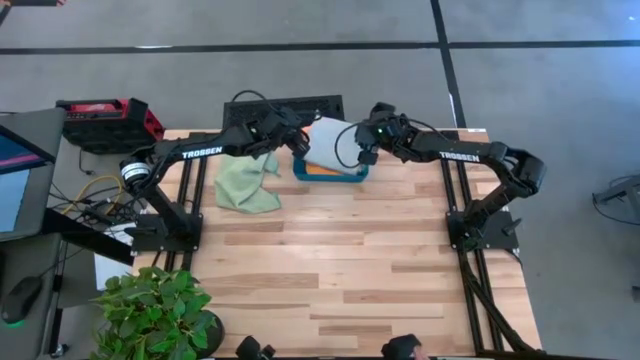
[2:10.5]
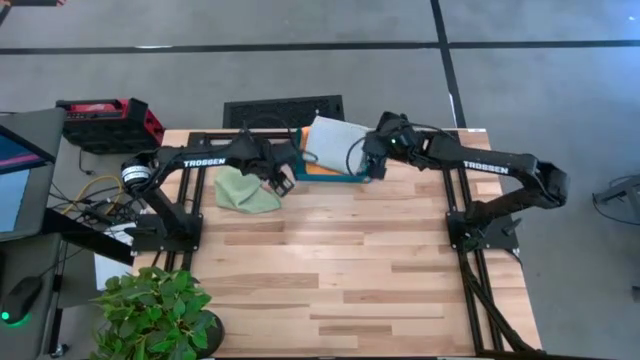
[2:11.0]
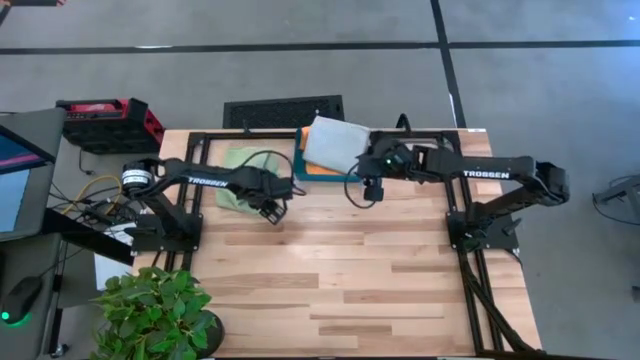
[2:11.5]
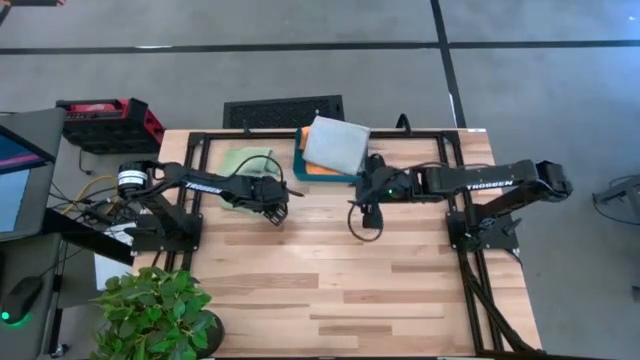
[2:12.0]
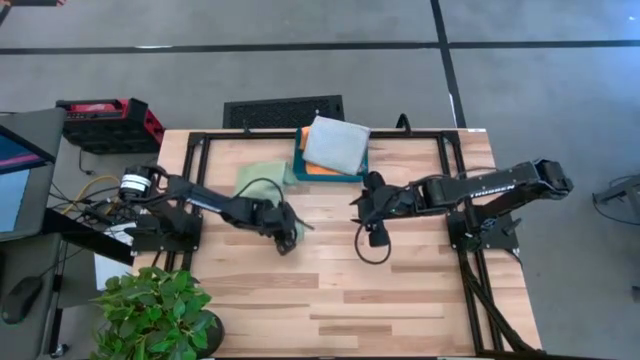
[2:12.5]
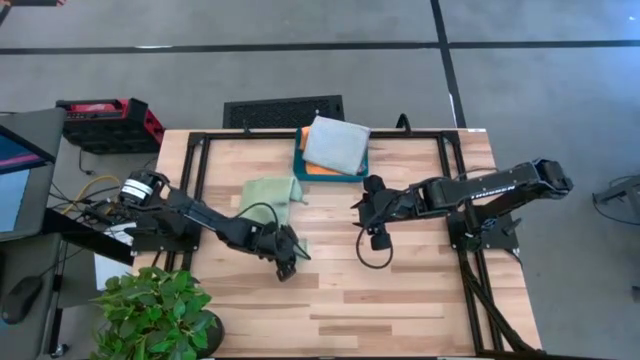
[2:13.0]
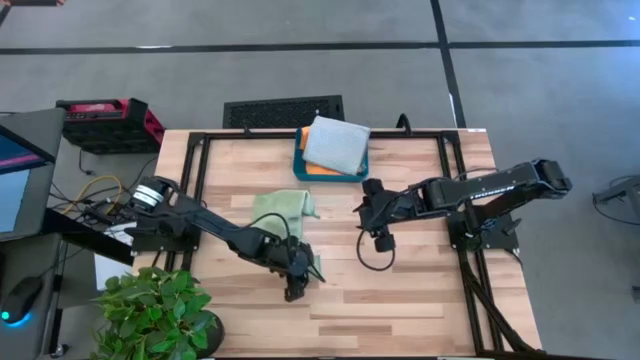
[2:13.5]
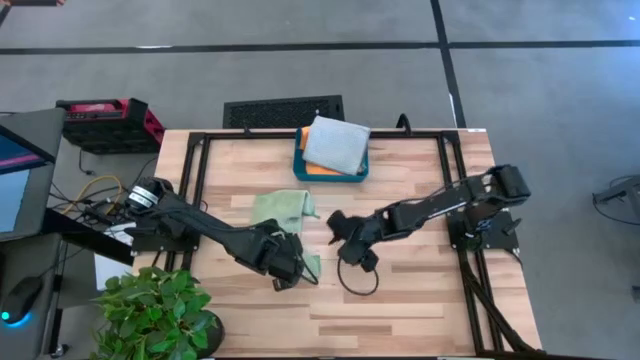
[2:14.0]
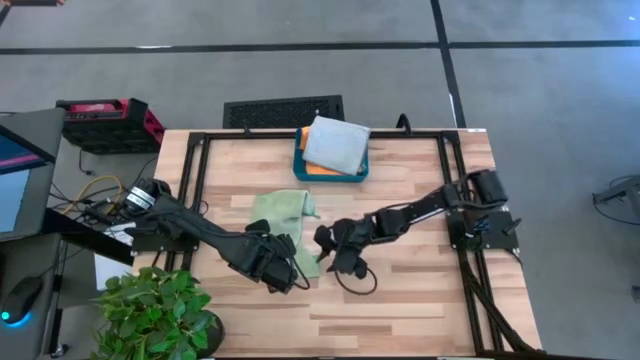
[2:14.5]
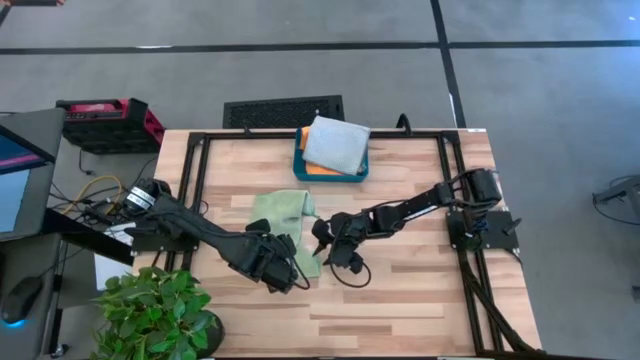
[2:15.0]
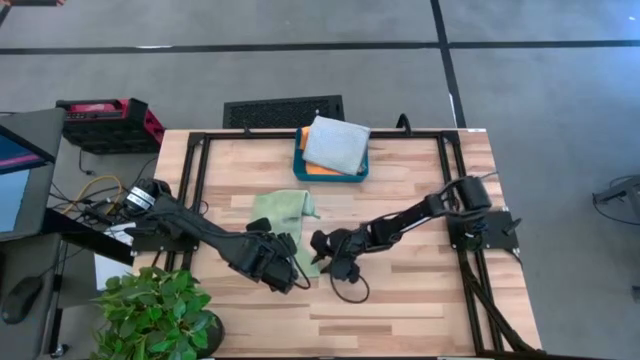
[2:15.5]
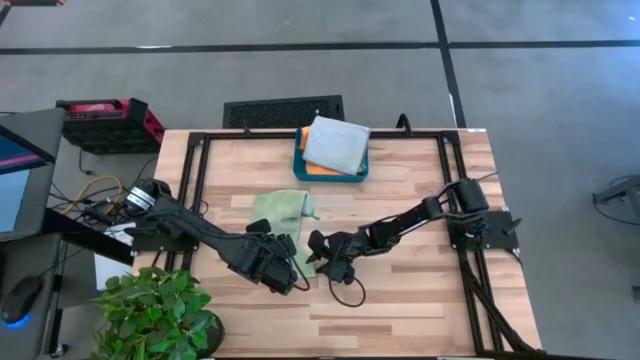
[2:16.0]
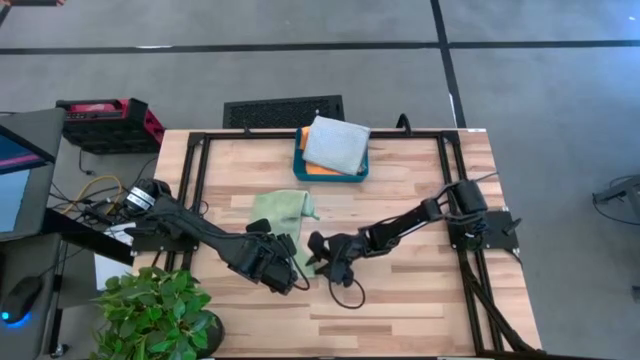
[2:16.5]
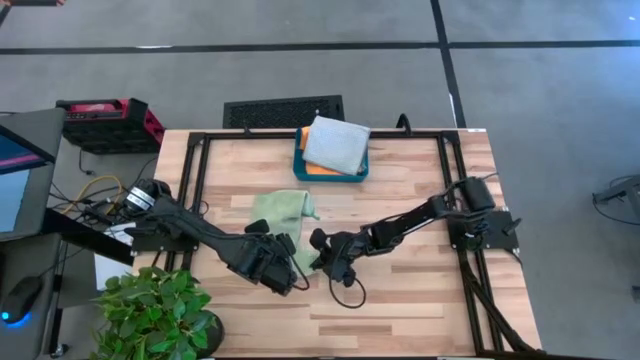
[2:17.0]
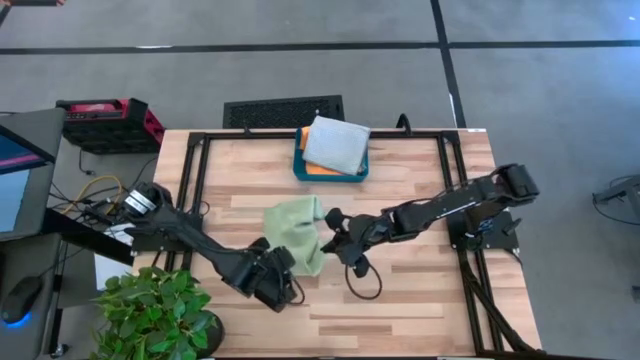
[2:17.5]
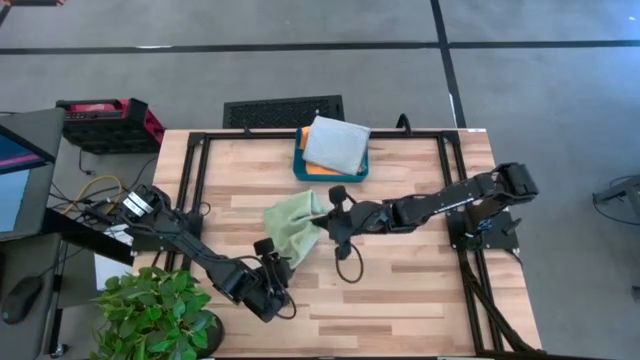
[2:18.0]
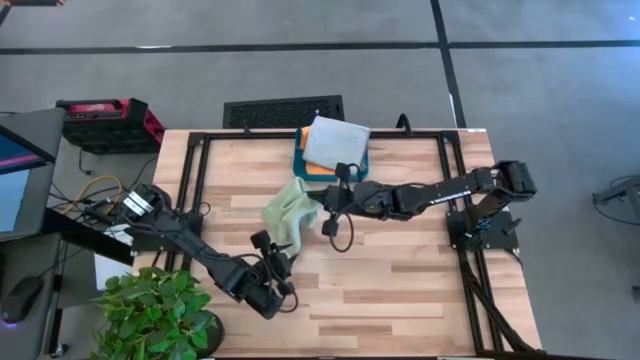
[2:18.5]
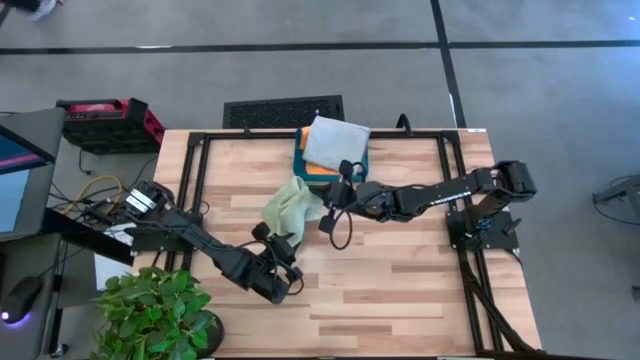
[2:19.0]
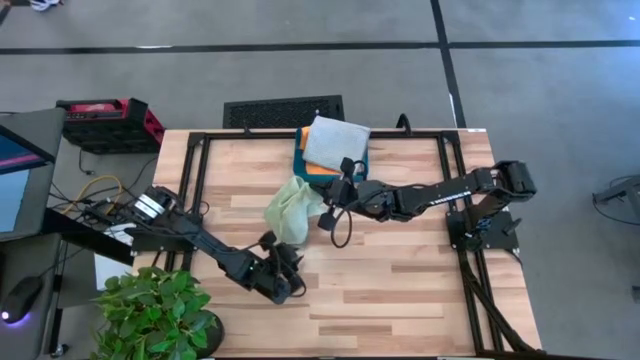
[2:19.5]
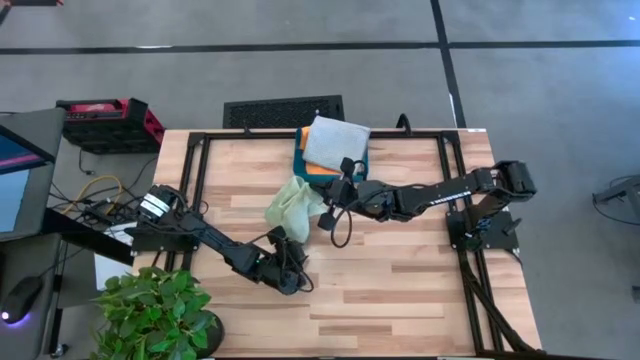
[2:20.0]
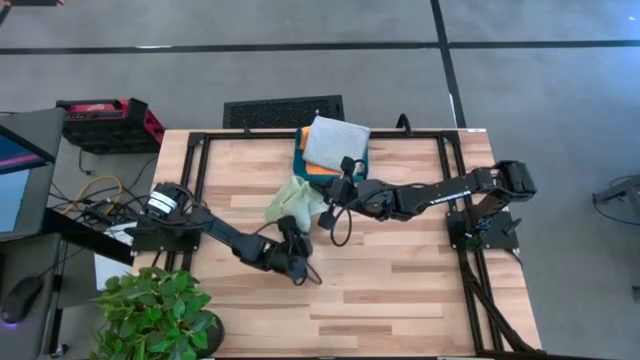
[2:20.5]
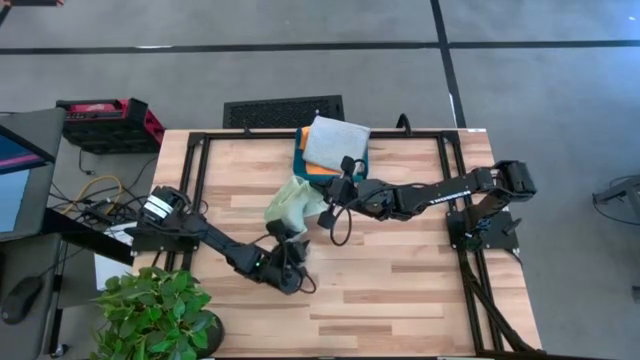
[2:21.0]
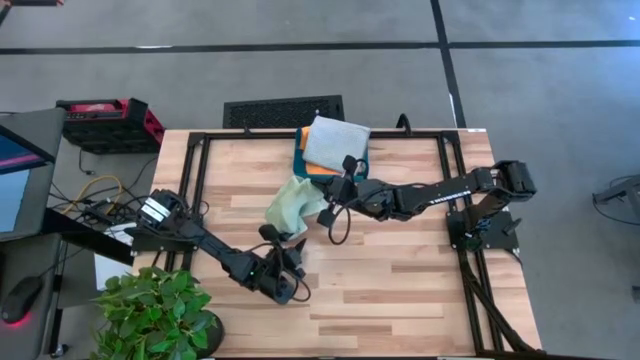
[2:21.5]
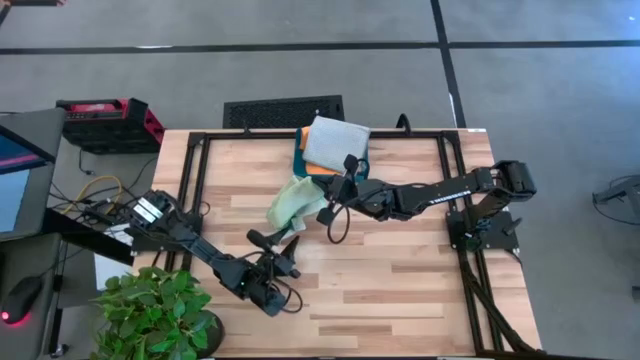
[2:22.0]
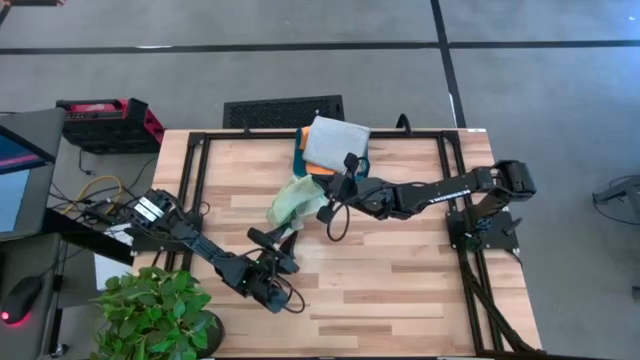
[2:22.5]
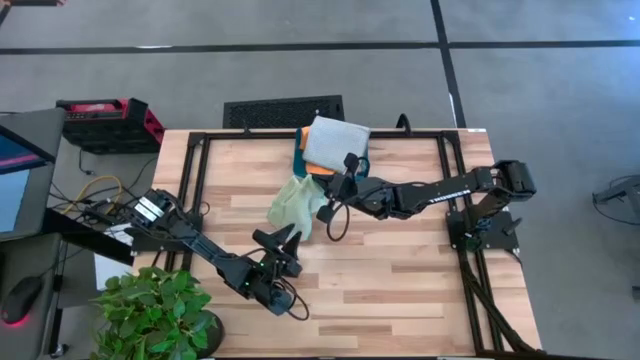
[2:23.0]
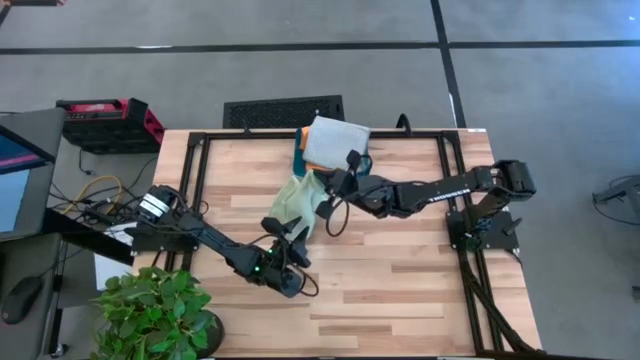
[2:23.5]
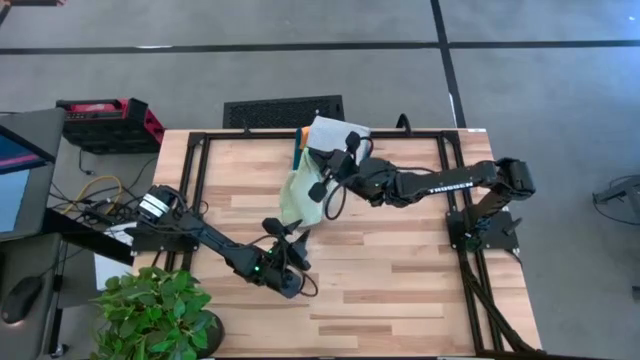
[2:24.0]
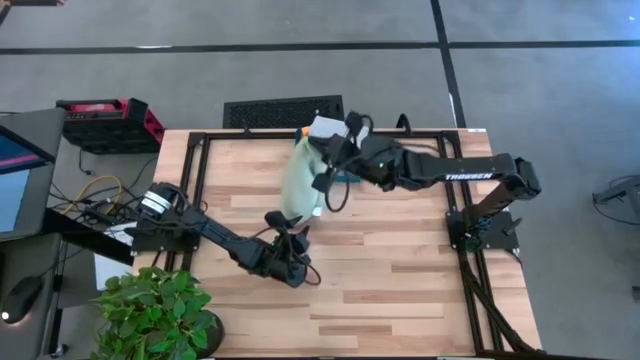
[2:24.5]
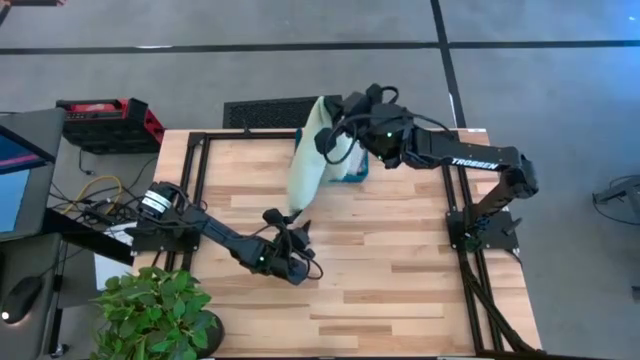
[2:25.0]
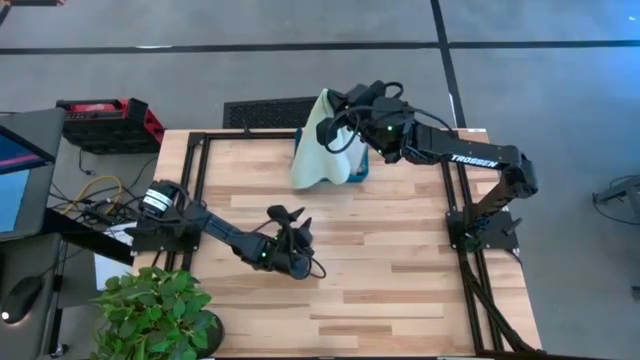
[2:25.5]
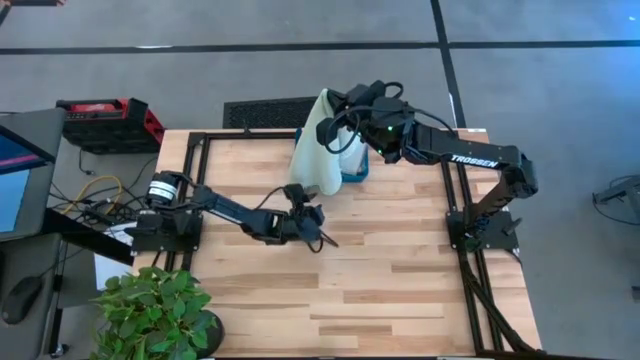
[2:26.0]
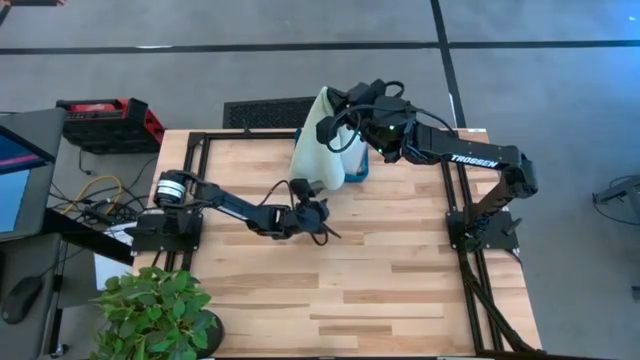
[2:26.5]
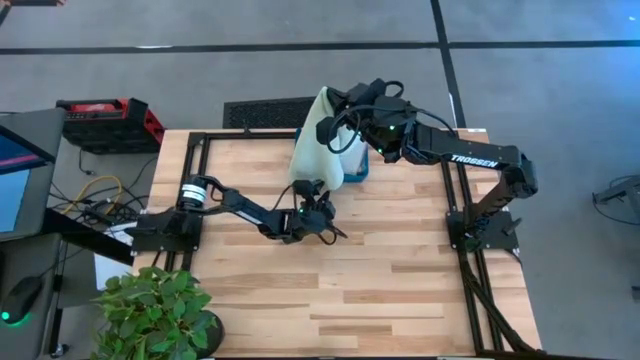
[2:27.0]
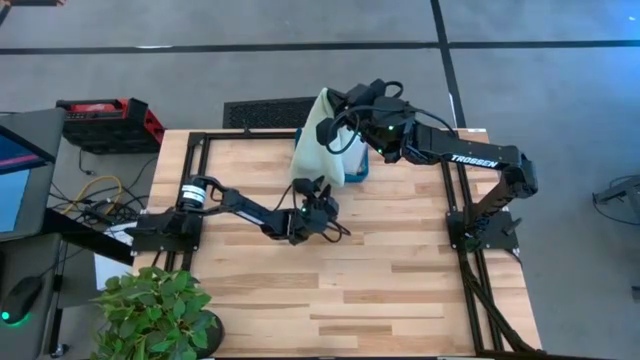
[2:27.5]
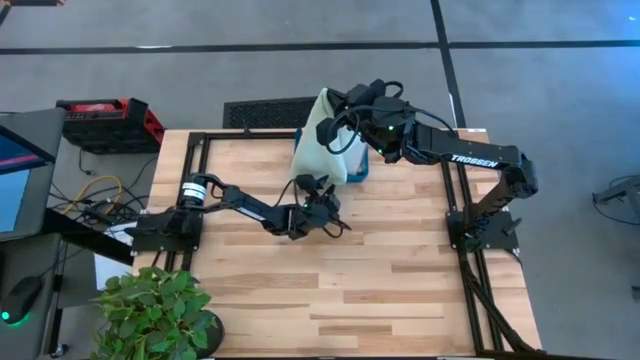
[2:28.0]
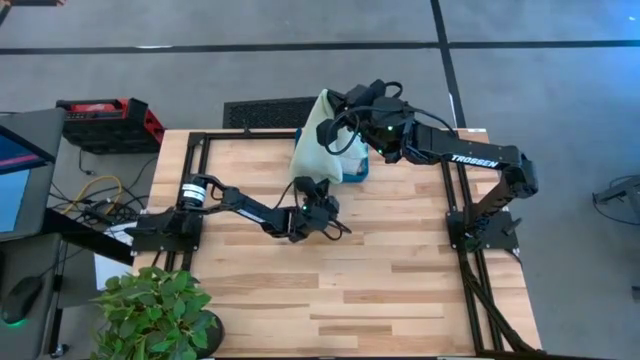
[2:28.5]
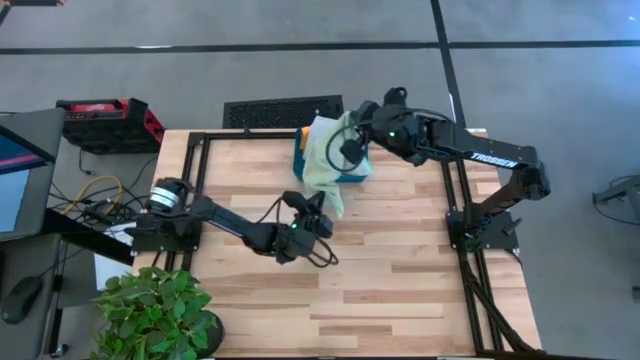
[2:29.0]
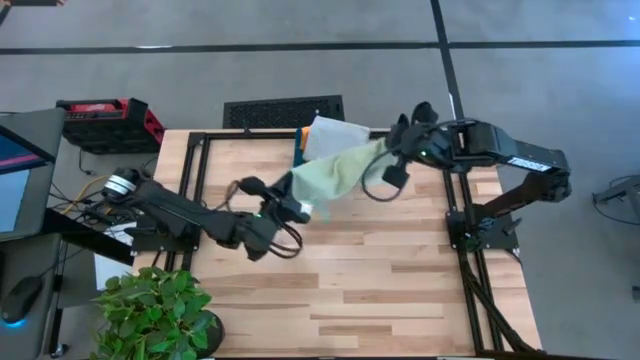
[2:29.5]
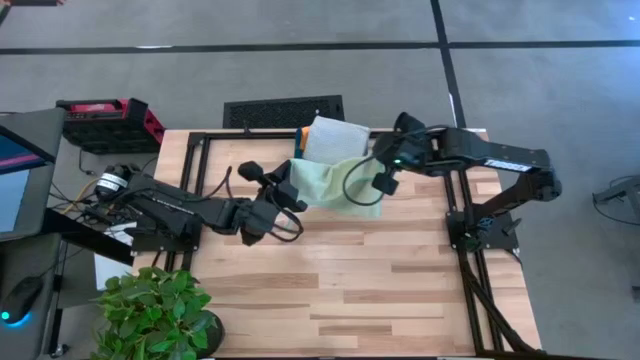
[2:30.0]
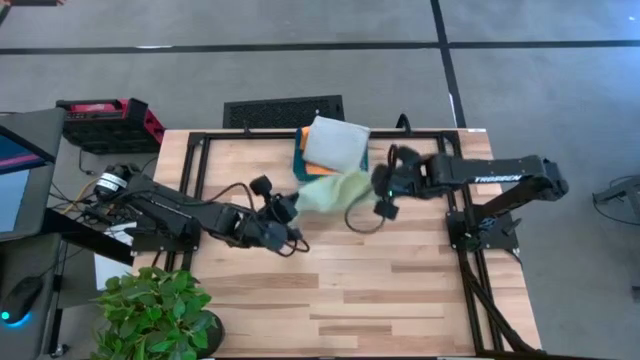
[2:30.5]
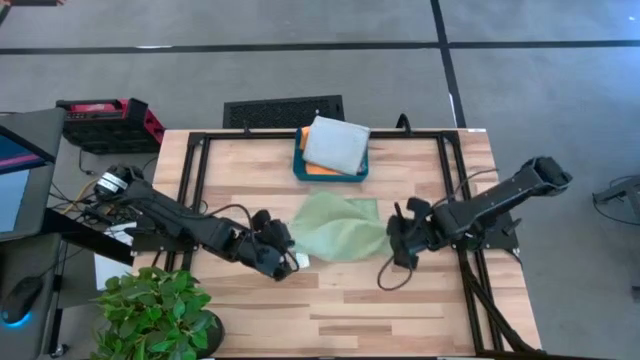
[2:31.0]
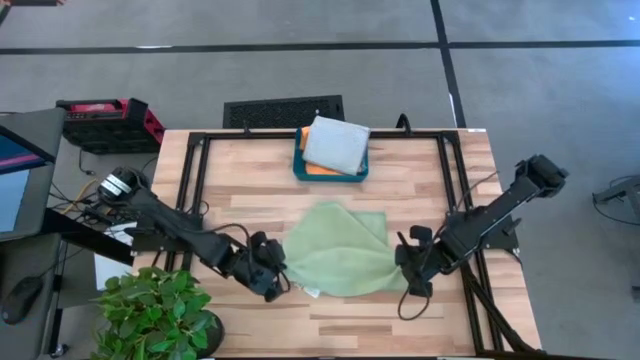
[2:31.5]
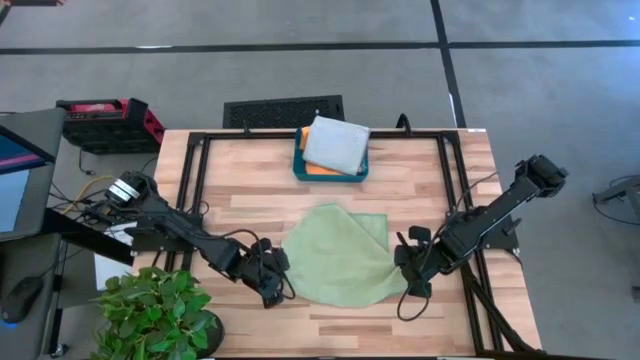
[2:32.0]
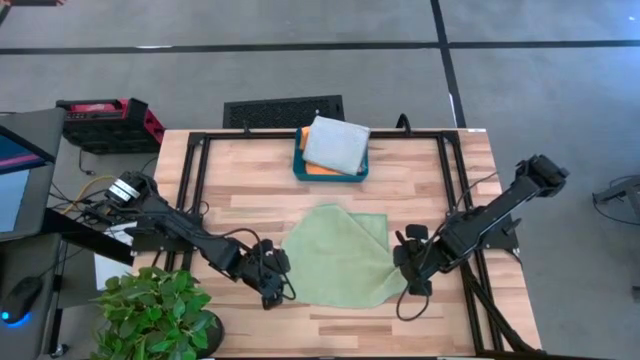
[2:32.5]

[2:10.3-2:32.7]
Task: Fold microfiber towels
Fold the green towel
